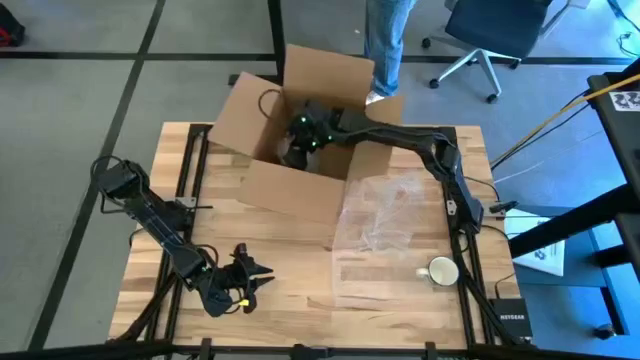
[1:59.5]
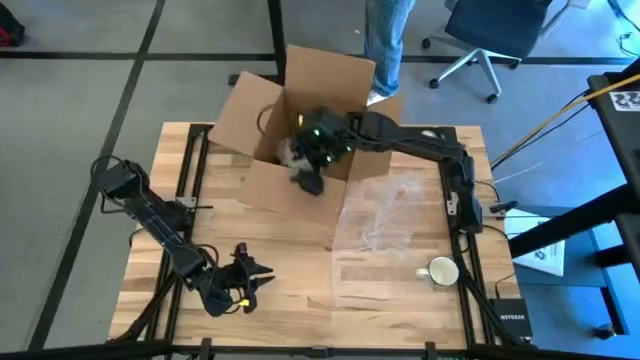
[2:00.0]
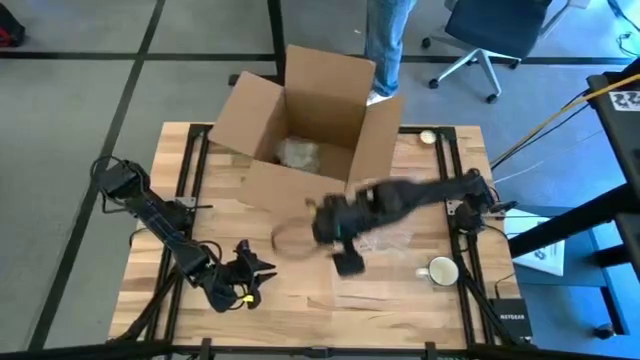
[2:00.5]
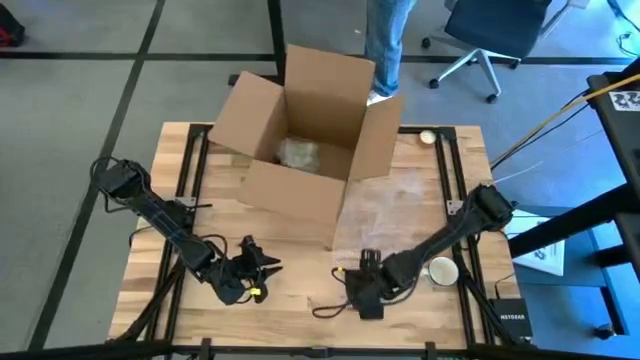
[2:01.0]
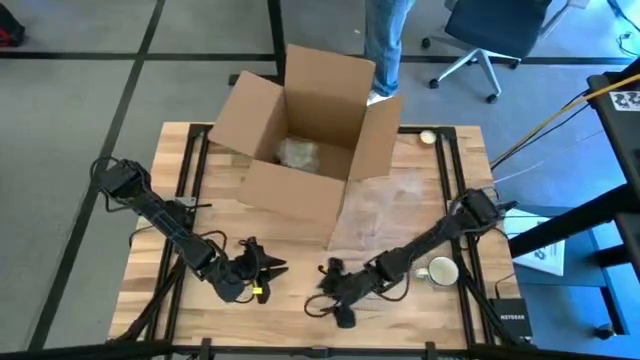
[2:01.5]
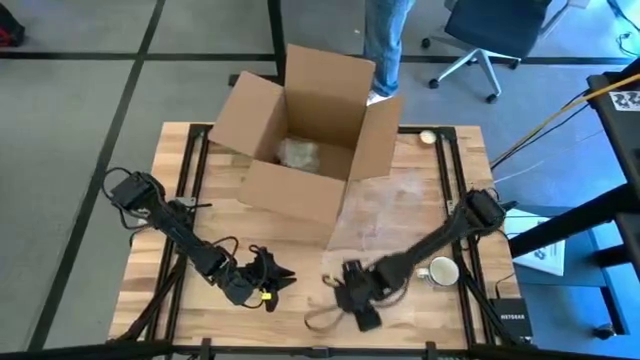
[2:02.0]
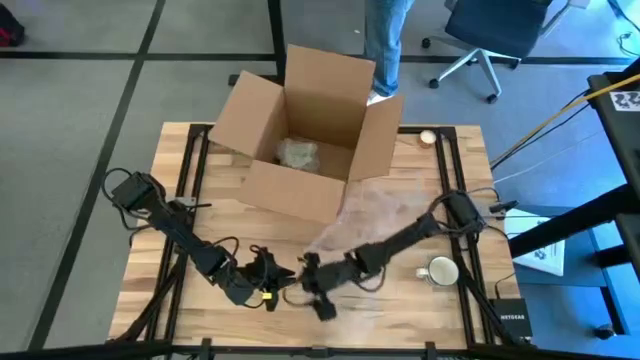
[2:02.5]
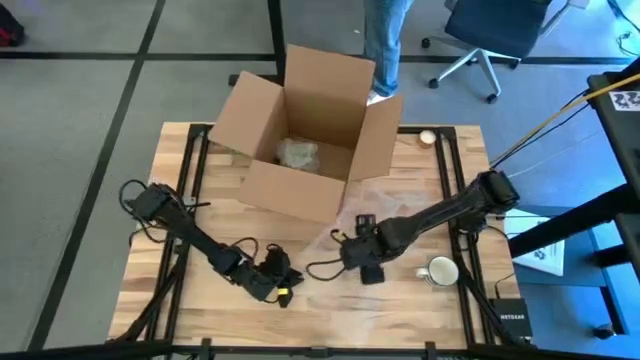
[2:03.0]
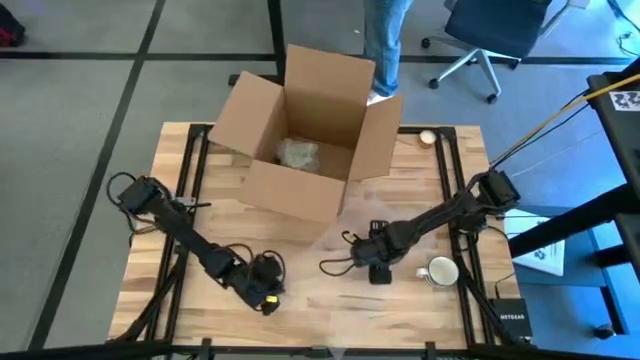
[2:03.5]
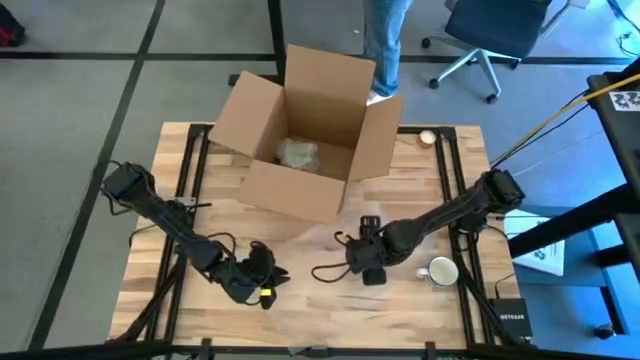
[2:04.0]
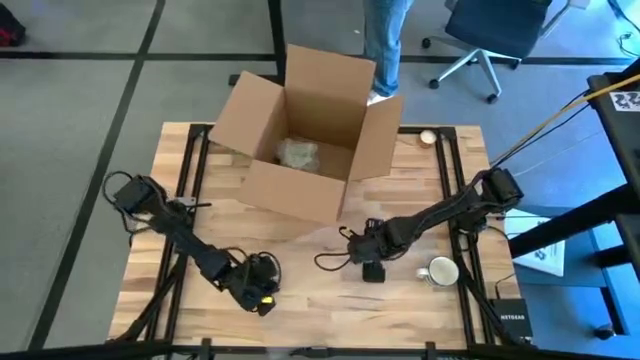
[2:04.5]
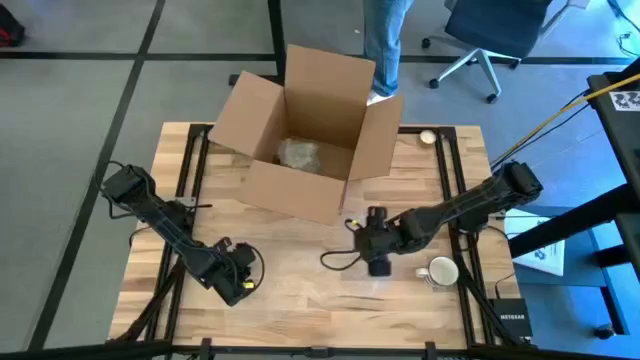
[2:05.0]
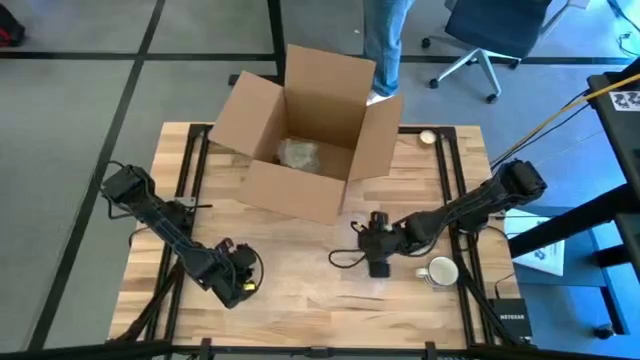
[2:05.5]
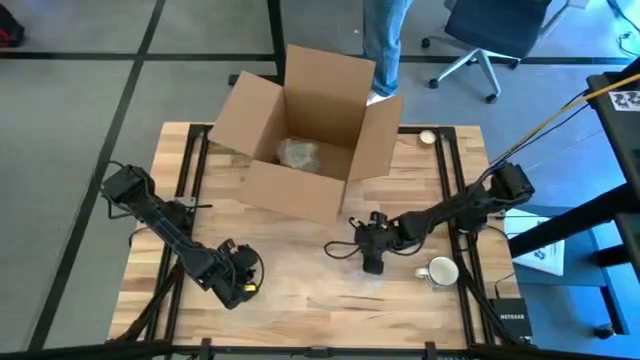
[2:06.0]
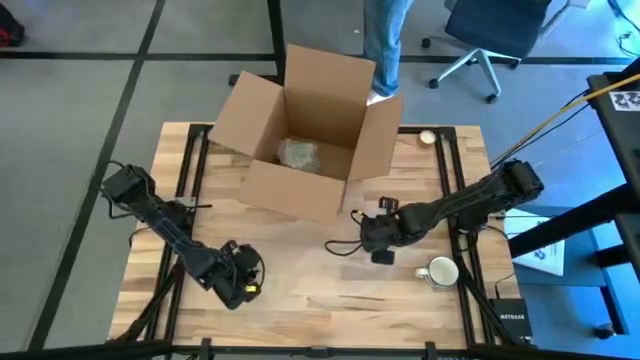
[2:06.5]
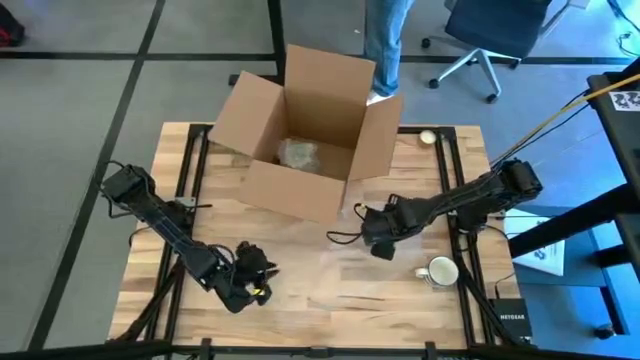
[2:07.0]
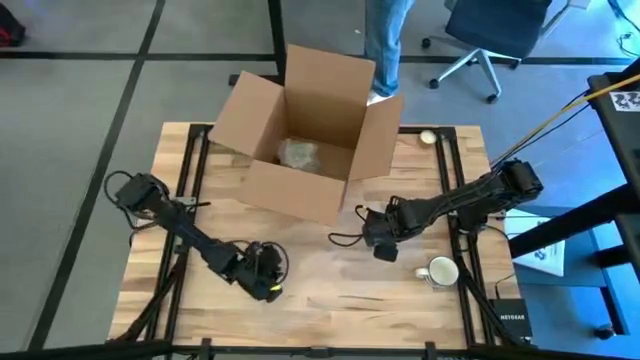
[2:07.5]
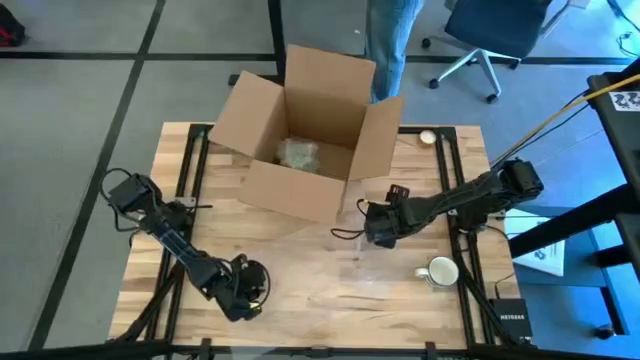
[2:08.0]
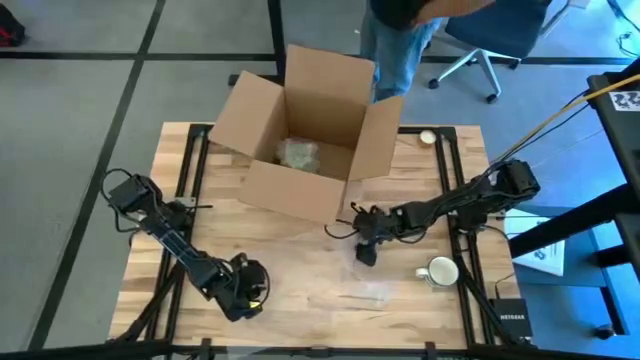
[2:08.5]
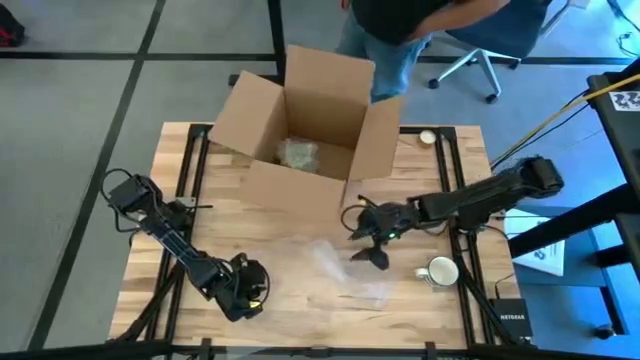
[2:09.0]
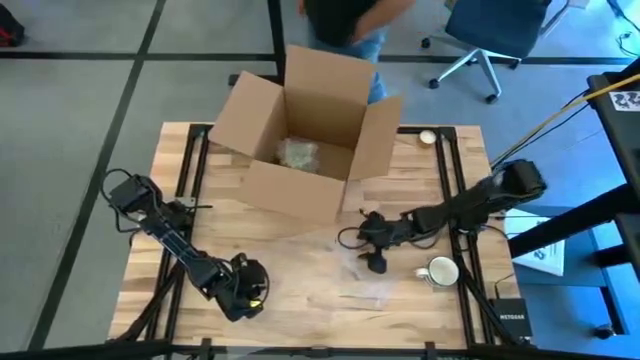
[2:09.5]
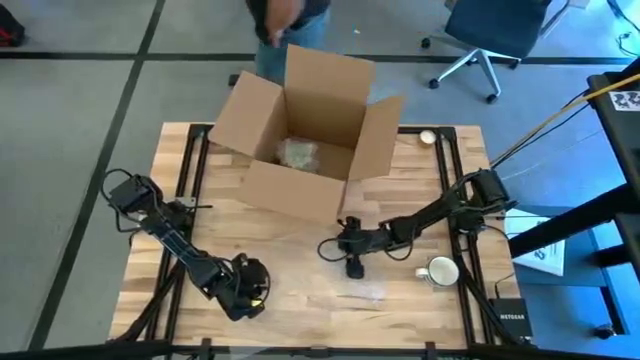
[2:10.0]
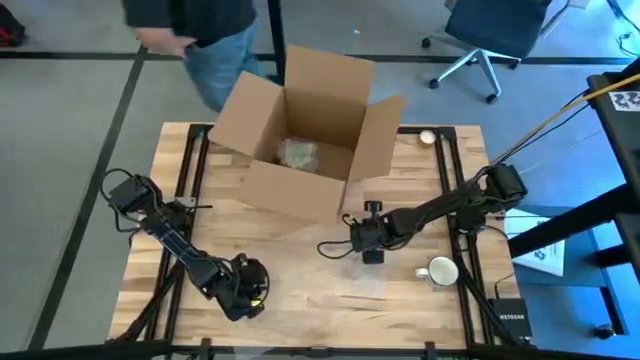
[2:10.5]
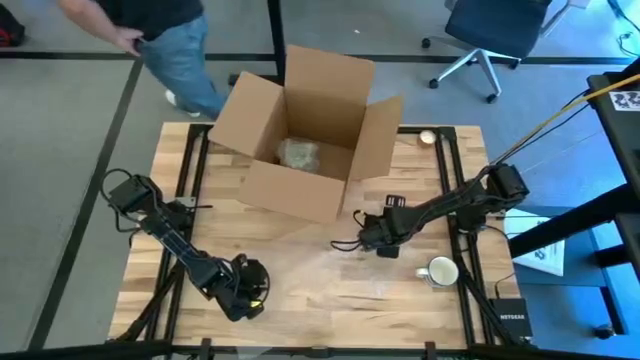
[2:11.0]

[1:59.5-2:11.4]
Task: wrap mug
Prepare the bubble wrap

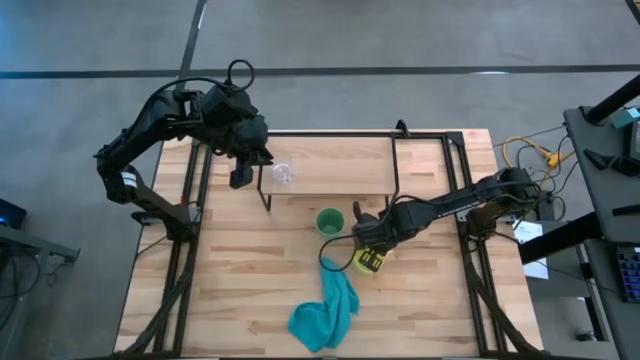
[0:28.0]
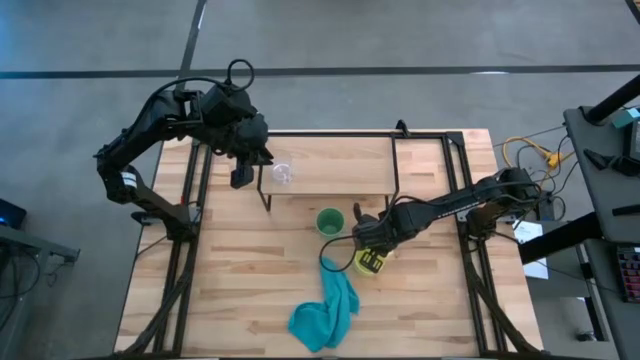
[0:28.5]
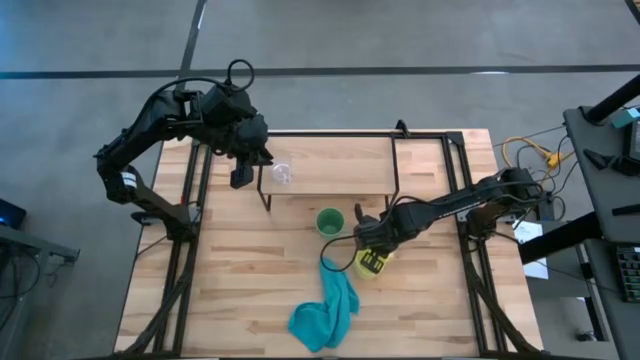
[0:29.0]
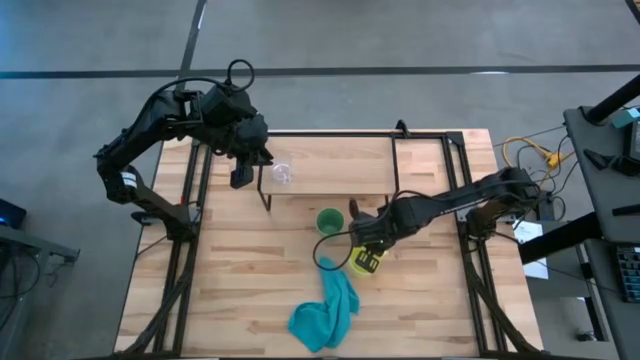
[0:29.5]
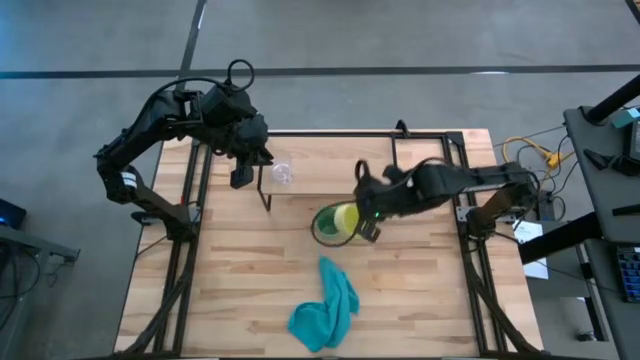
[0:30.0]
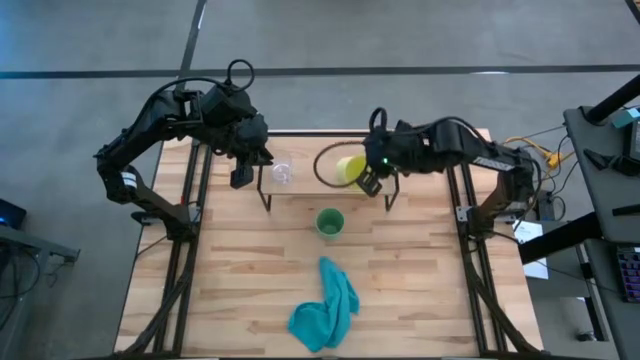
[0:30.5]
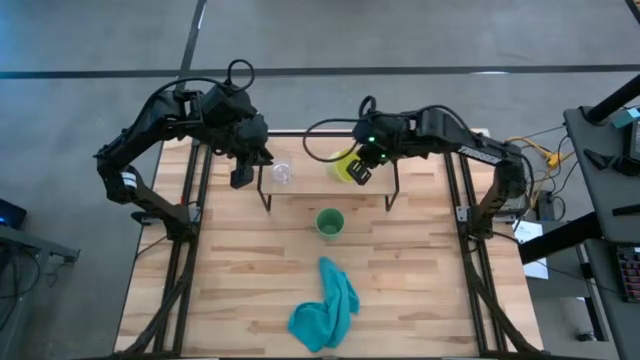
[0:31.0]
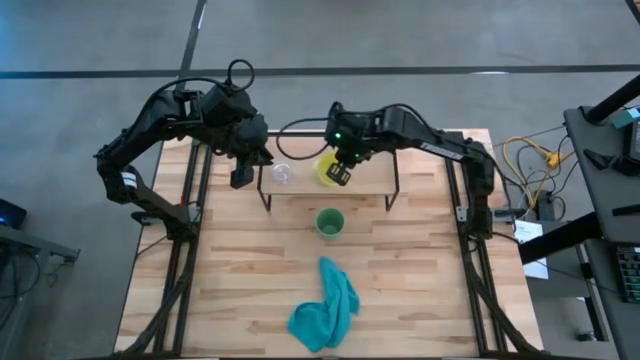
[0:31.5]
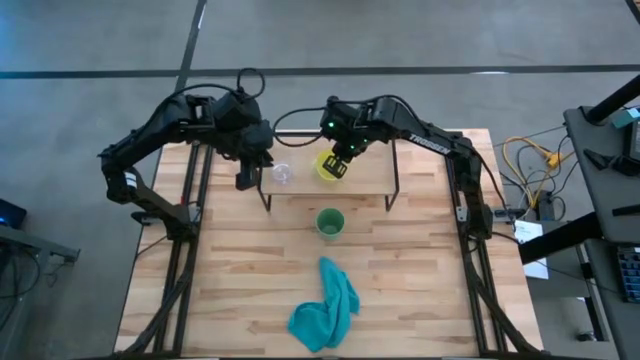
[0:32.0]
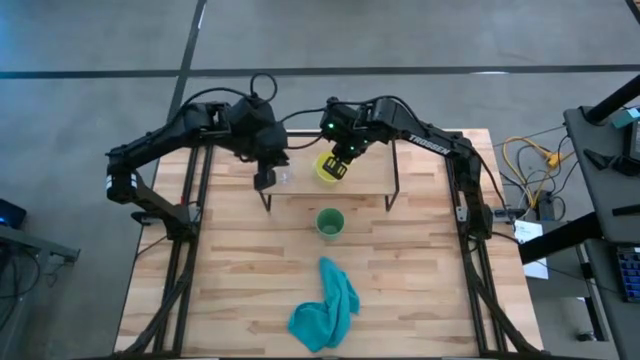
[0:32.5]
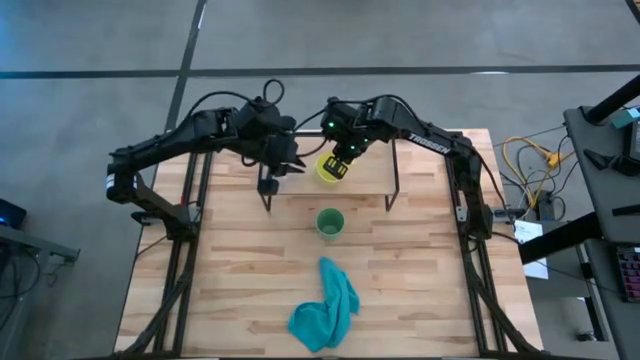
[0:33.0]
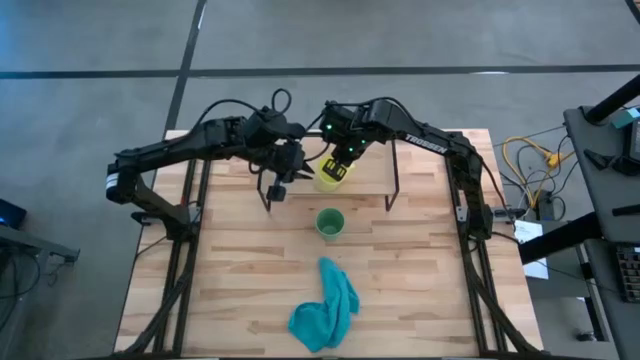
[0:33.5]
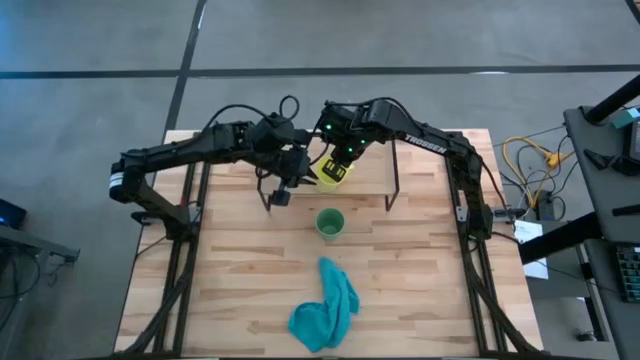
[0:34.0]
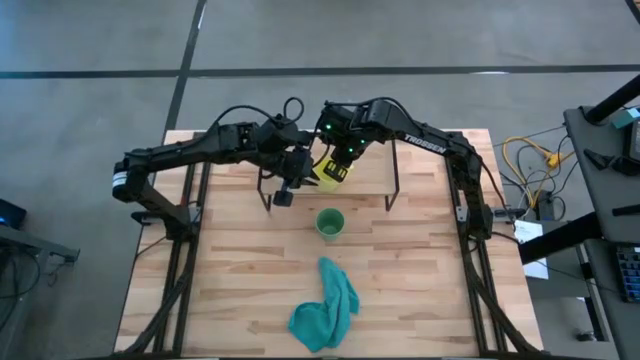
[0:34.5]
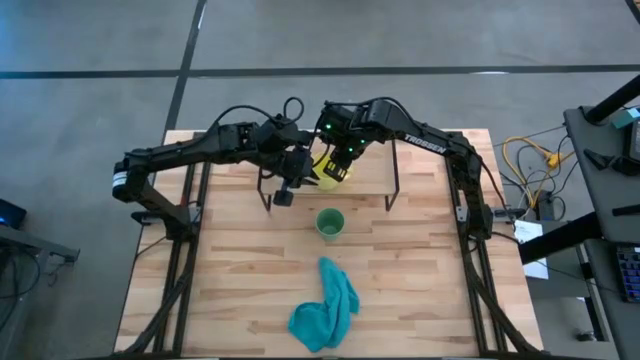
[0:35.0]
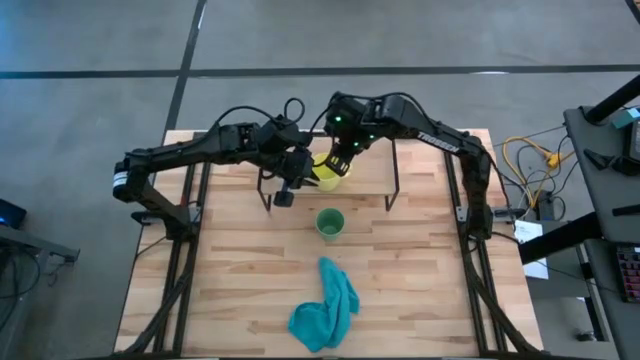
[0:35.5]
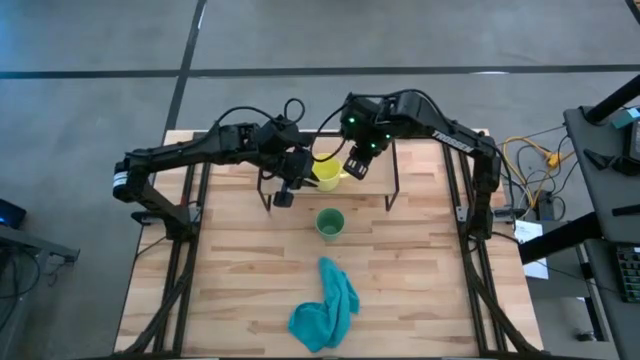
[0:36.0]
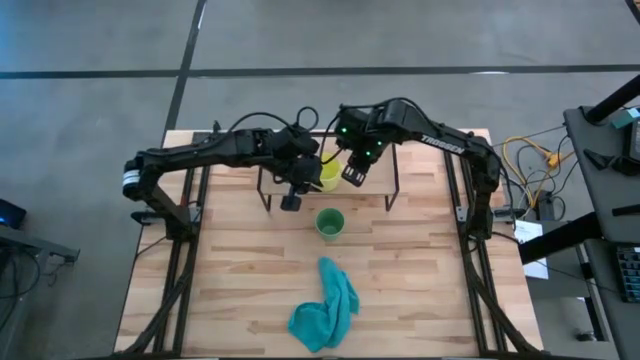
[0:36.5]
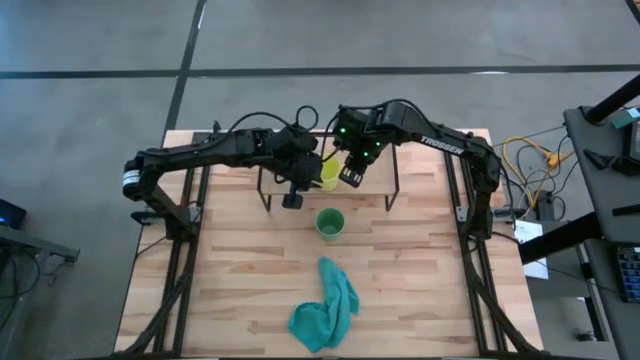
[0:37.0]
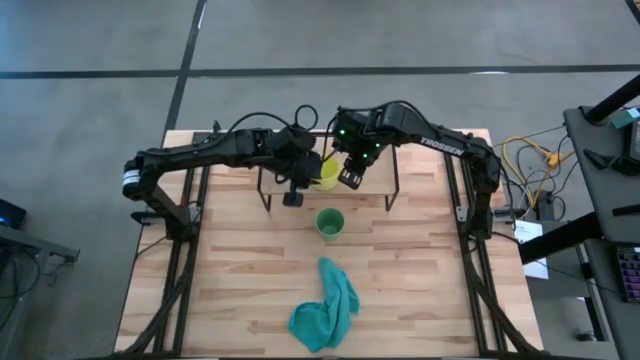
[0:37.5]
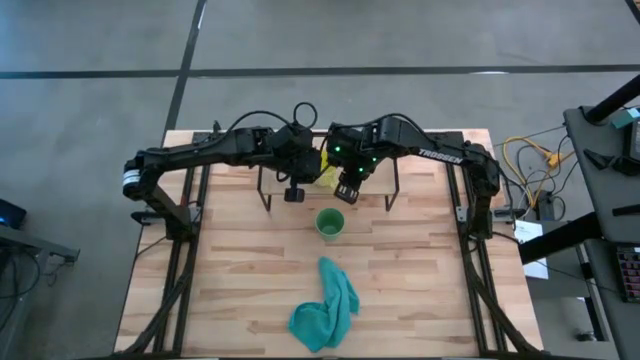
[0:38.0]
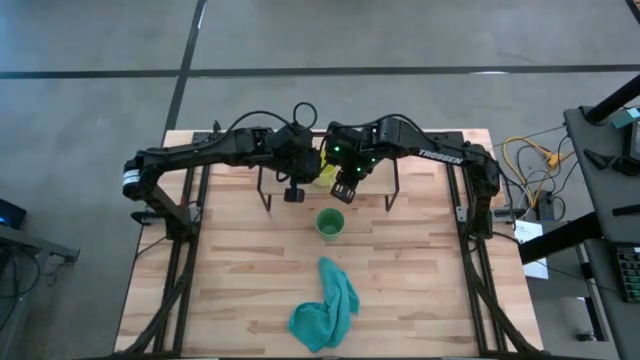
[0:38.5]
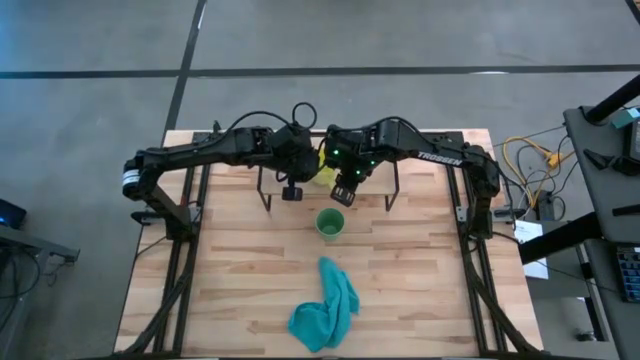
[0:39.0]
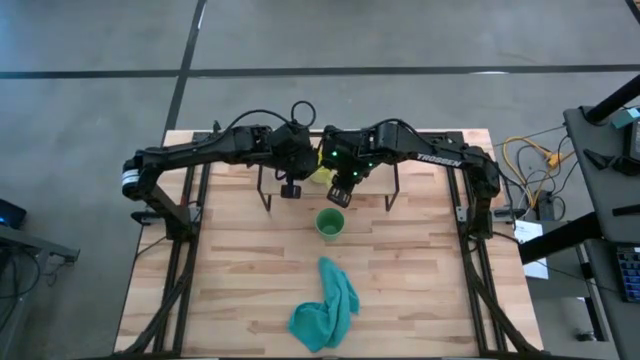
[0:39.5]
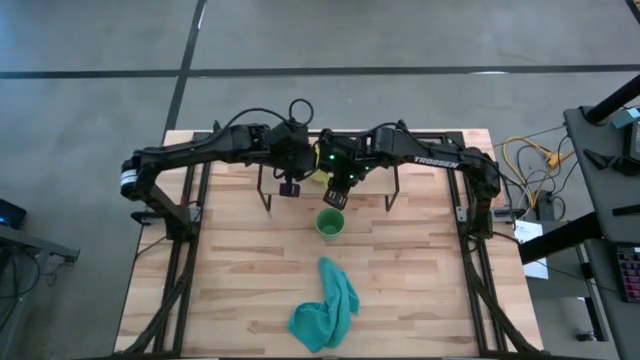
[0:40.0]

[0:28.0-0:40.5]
Task: Stack small to large cups/mugs on shelf
Put the yellow cup on the shelf
